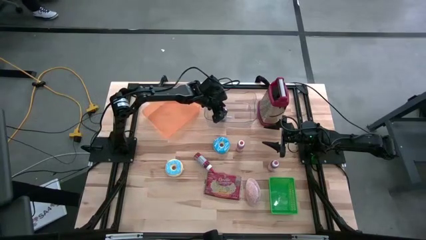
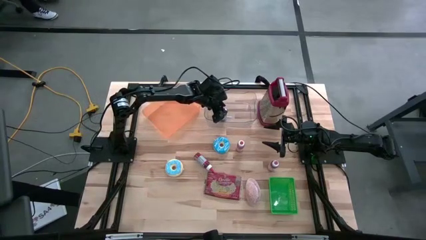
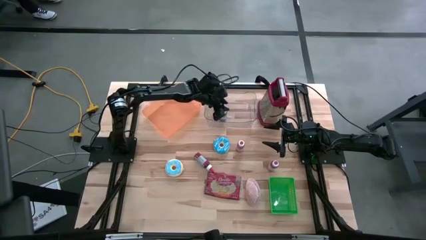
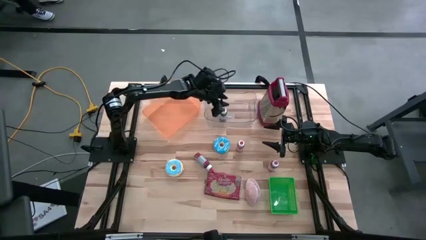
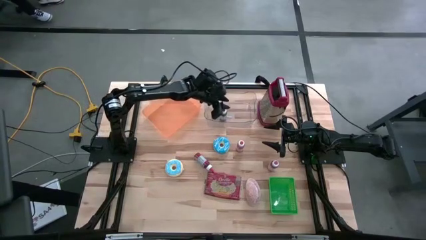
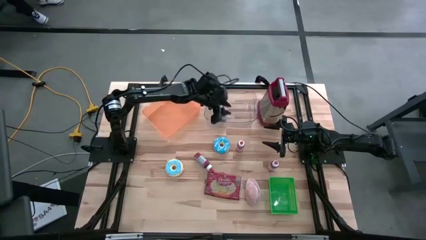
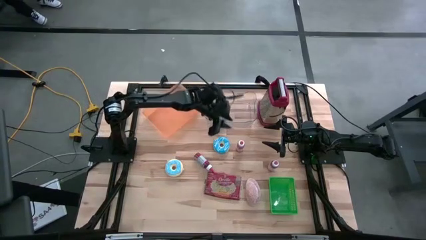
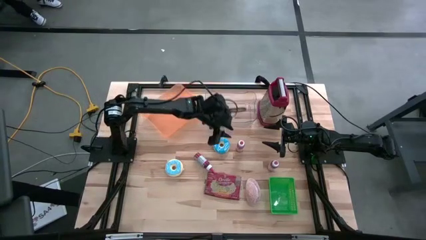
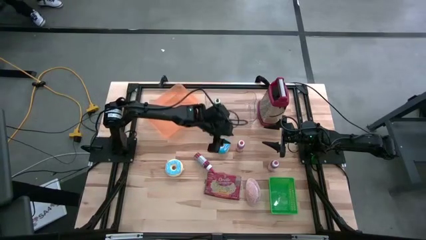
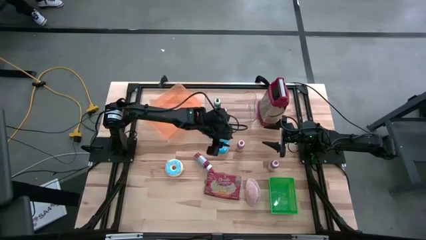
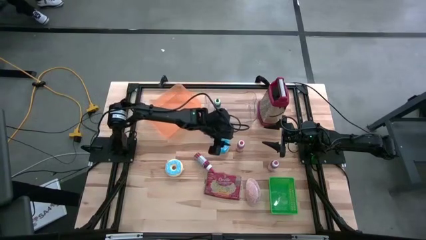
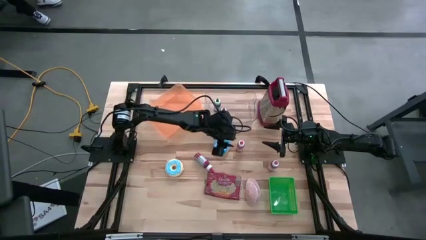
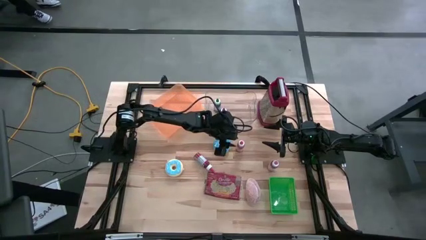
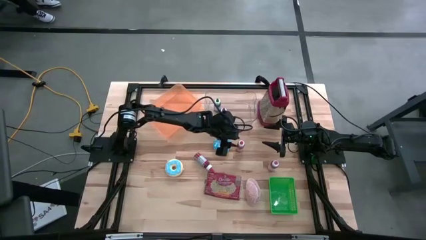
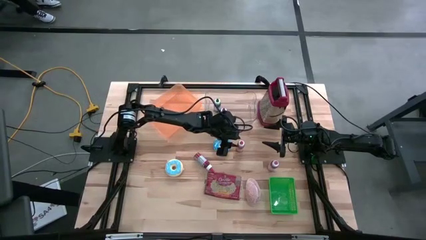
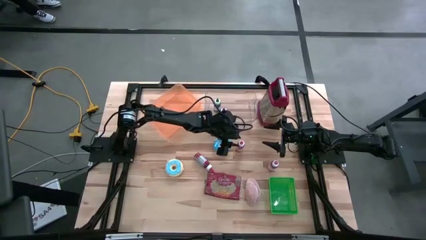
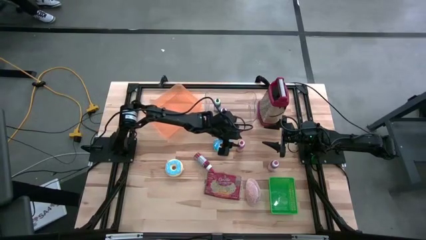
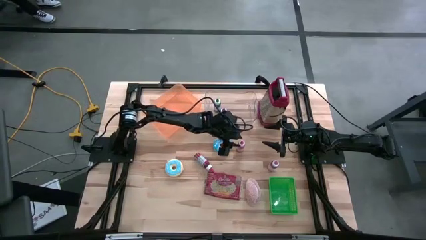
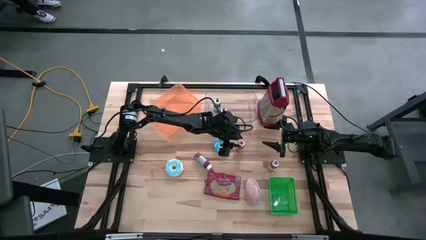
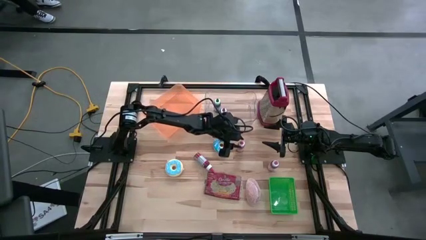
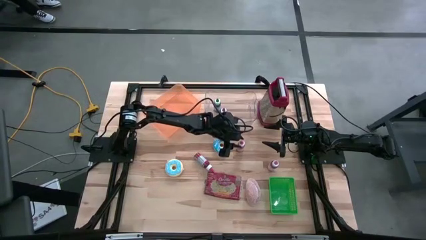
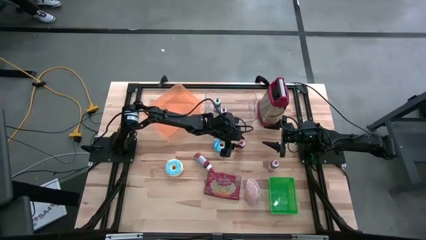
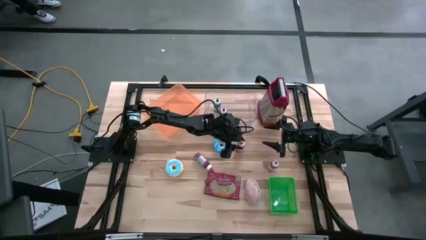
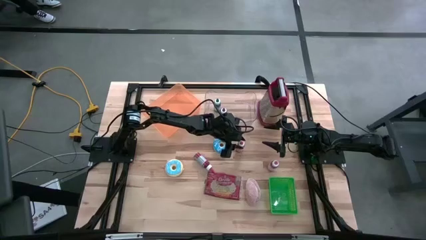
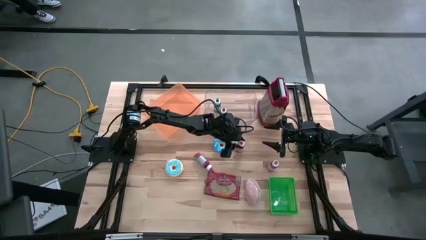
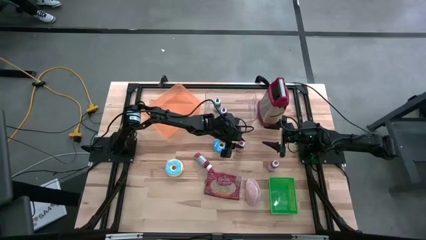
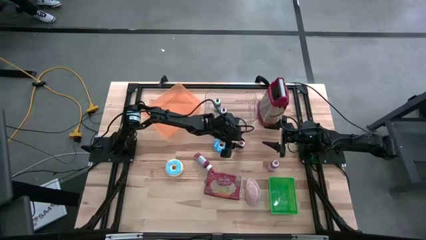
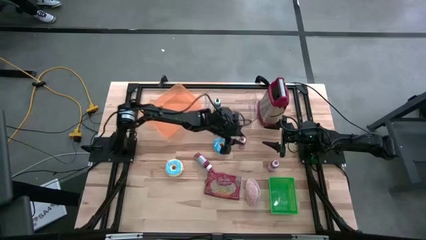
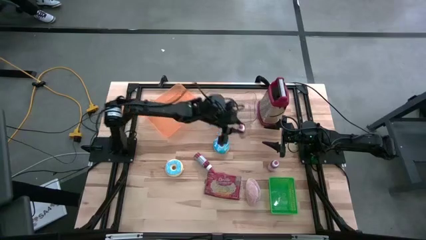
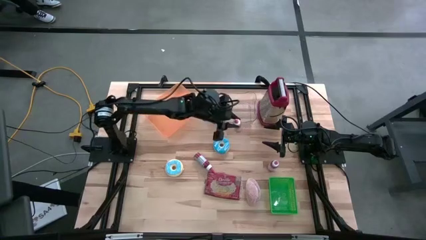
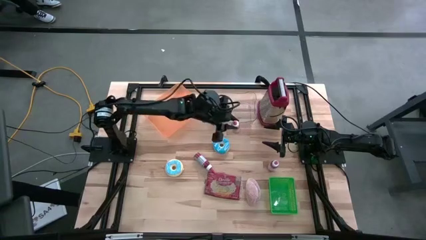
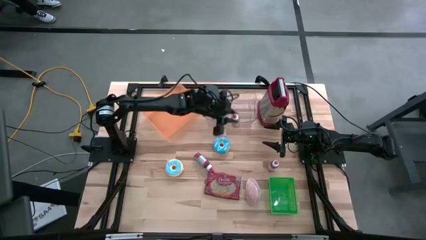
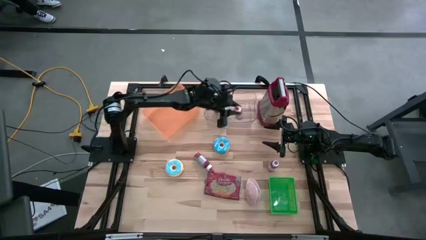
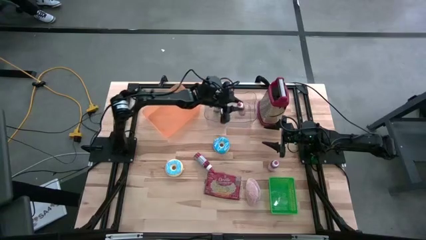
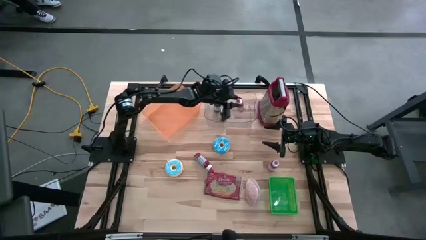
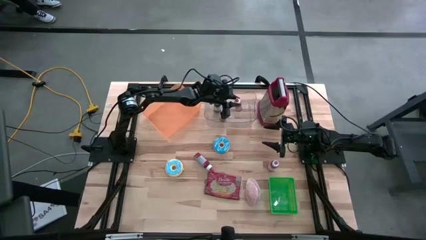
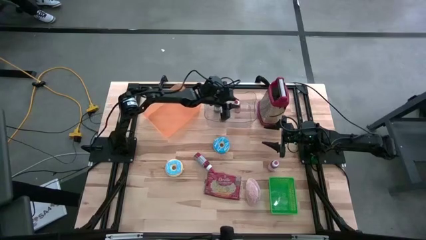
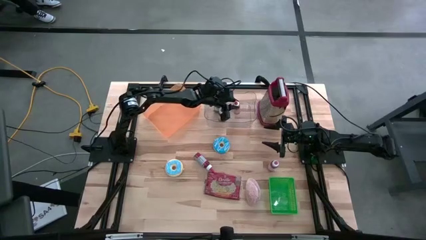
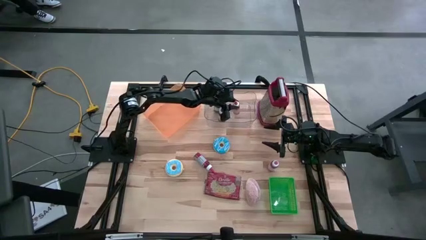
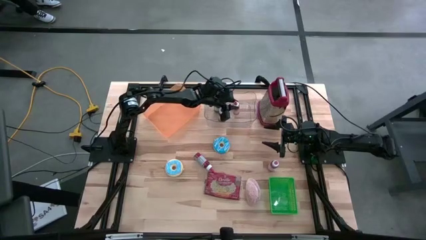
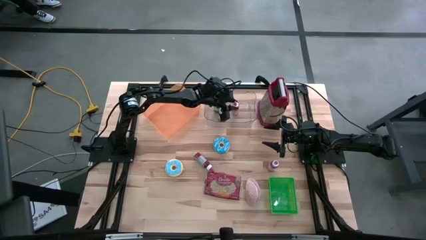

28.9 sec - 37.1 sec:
Put the orange food coloring bottle into the transparent bin

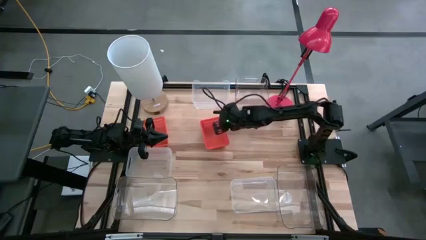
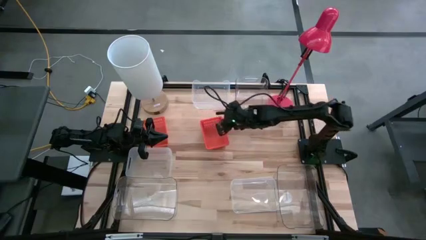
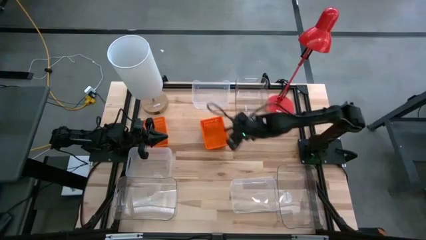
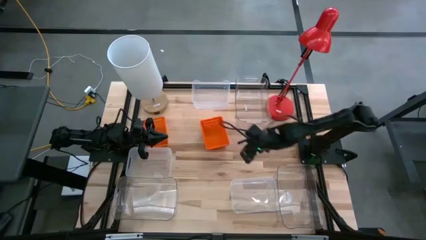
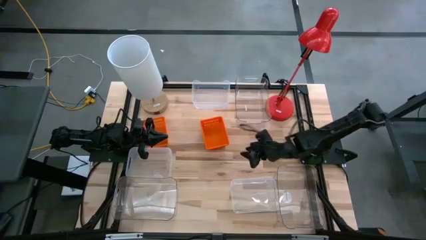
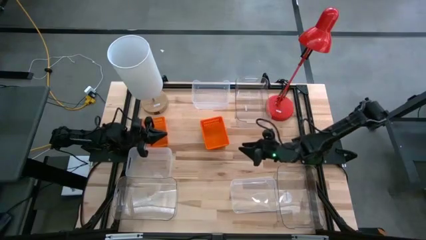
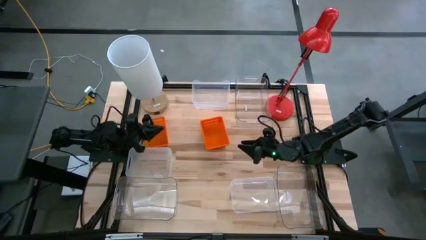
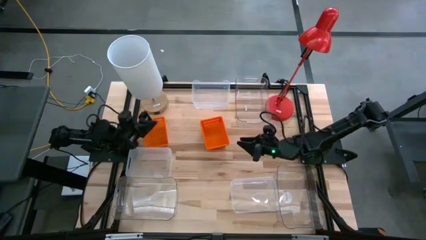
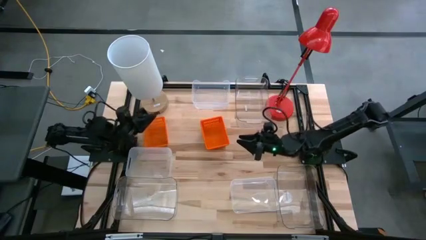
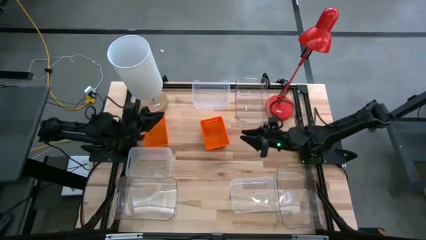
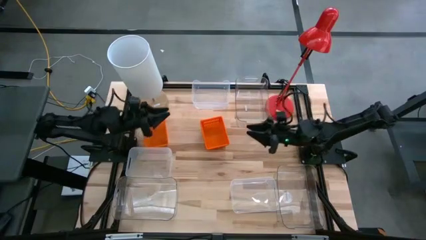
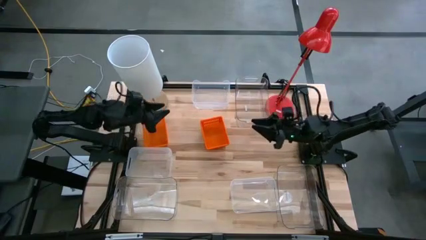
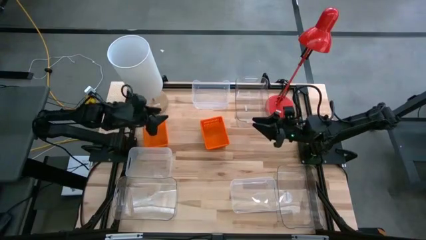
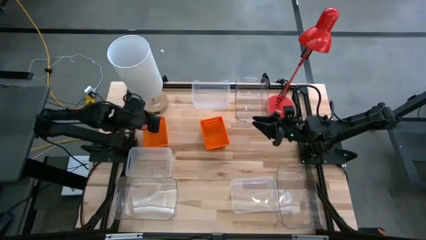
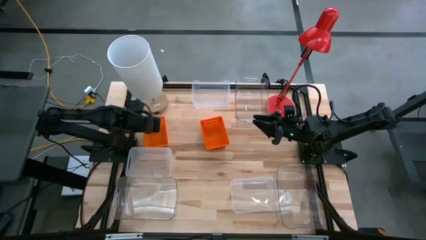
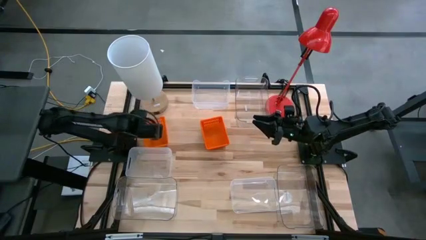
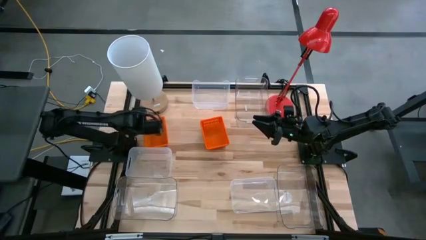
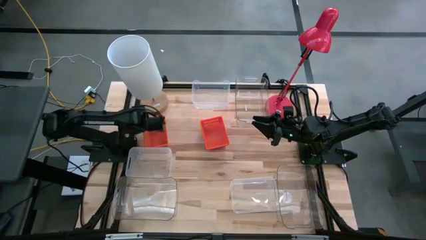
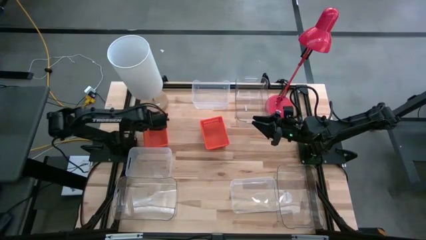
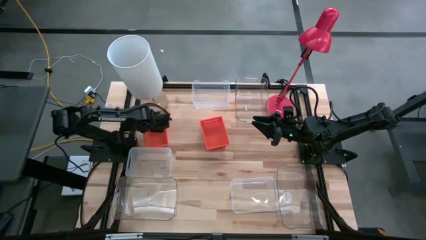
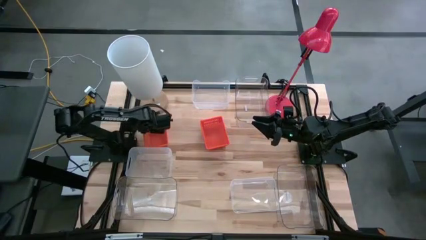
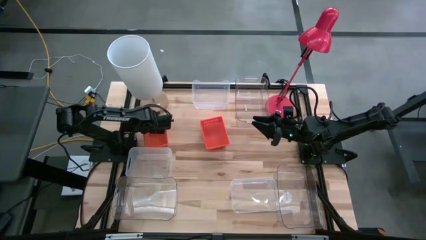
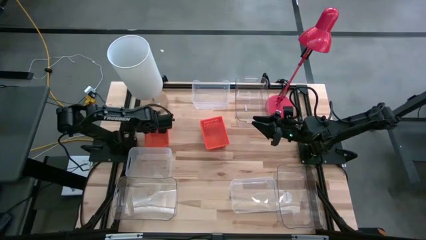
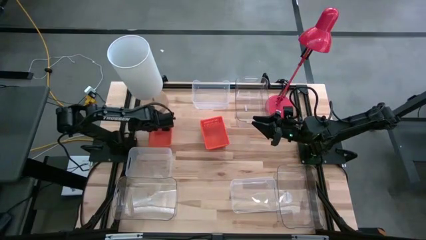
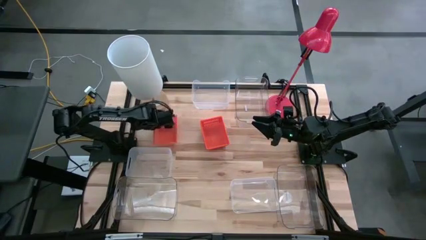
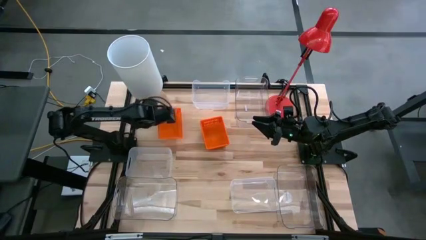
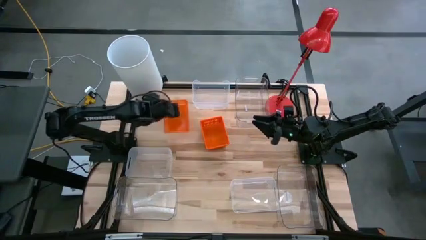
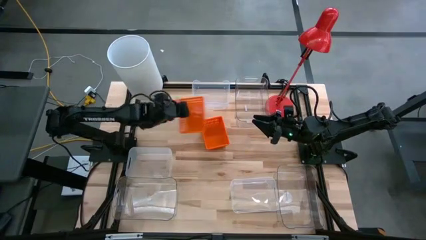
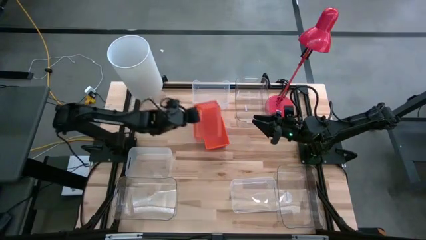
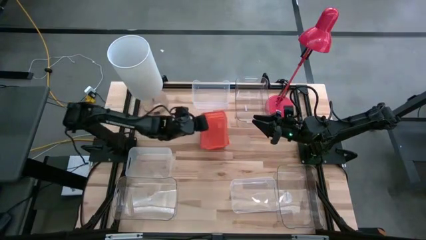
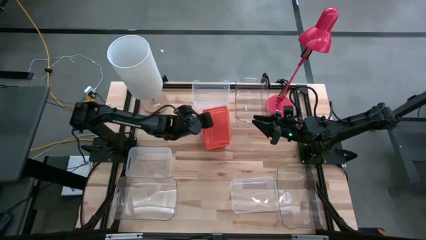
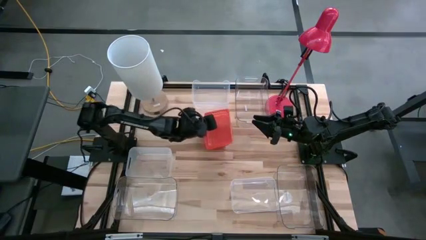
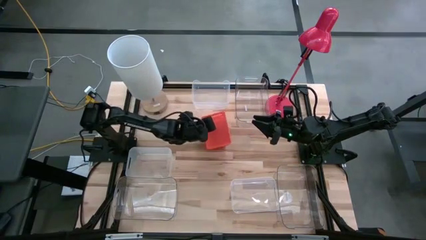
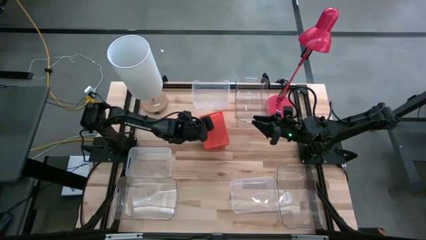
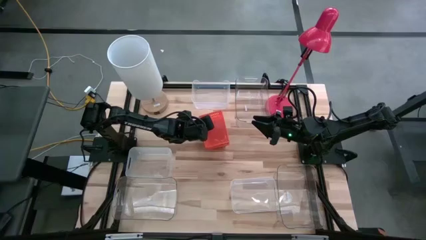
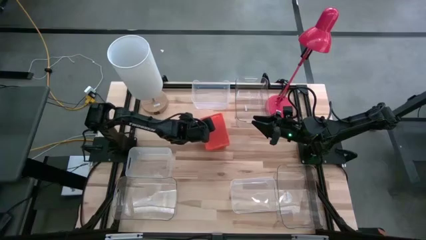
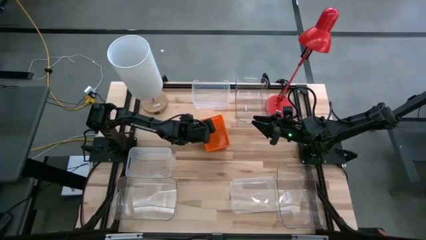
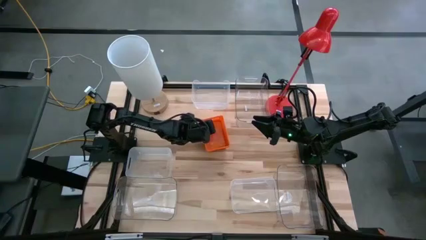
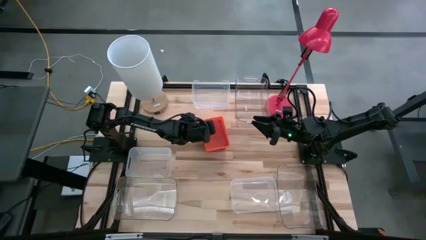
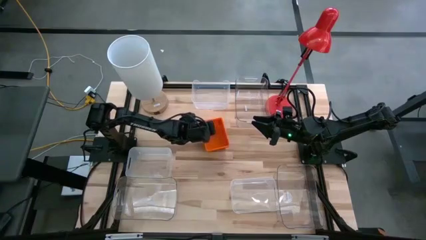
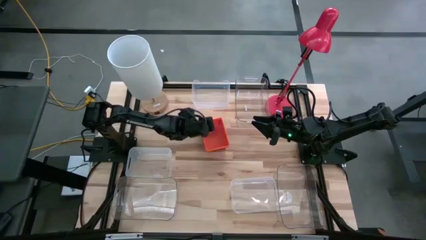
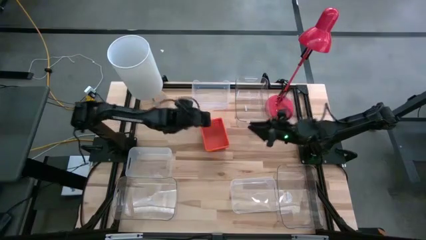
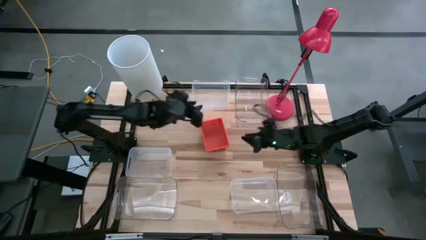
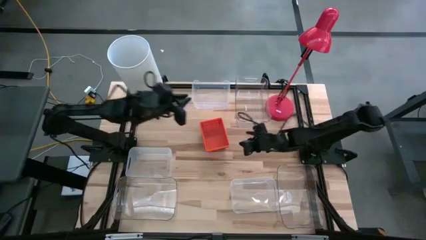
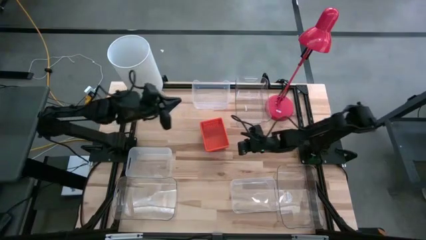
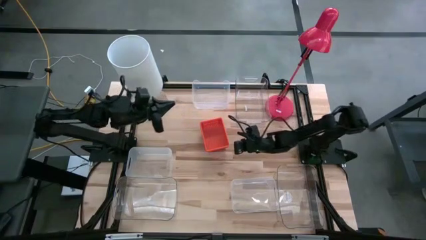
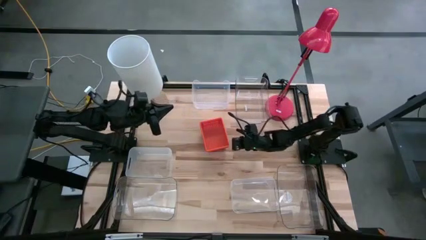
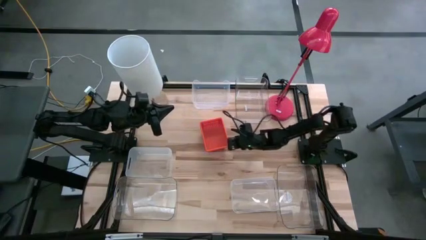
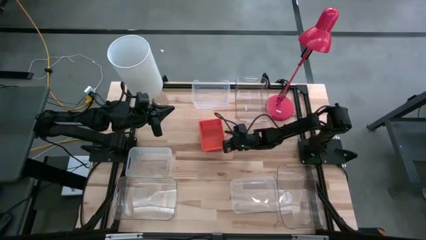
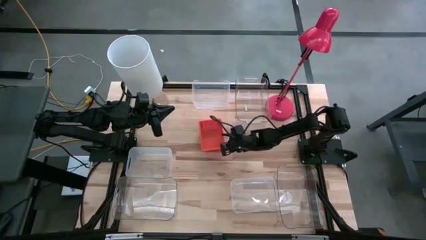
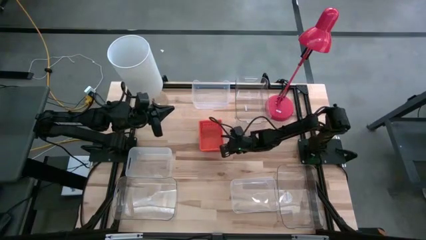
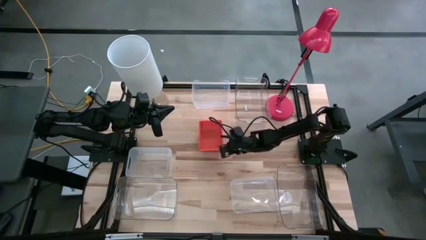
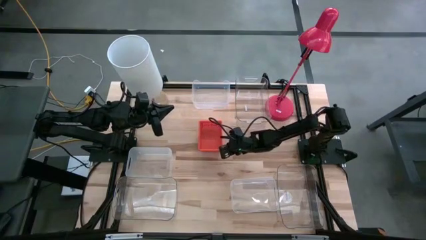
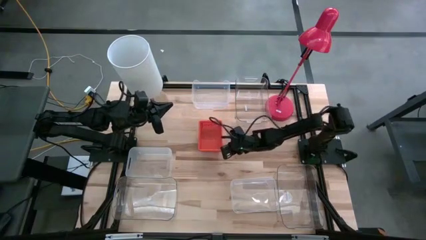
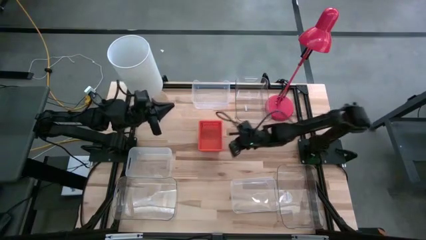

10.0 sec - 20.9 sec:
Stack the left orange bin on the right orange bin
